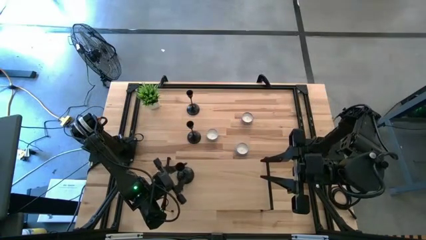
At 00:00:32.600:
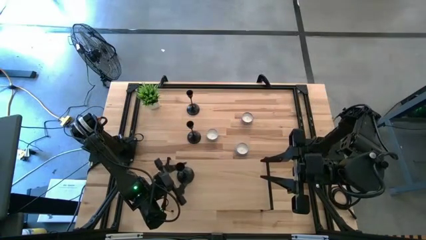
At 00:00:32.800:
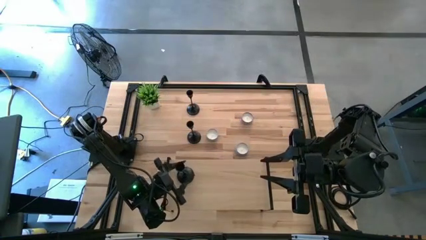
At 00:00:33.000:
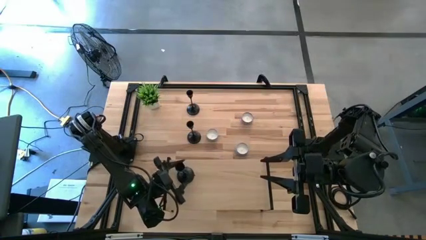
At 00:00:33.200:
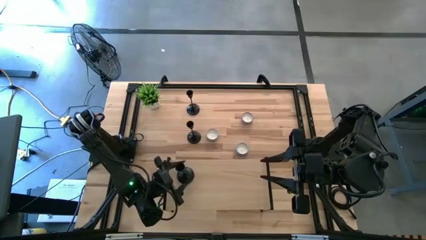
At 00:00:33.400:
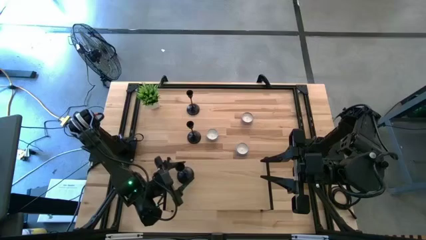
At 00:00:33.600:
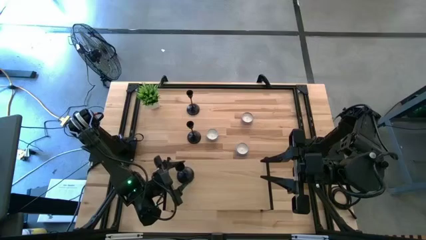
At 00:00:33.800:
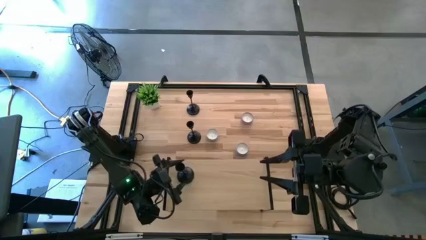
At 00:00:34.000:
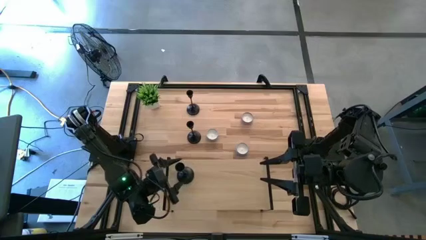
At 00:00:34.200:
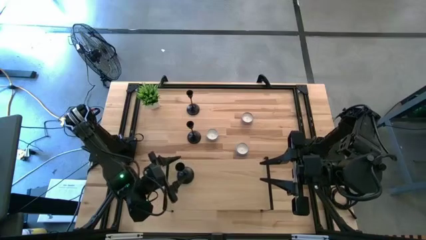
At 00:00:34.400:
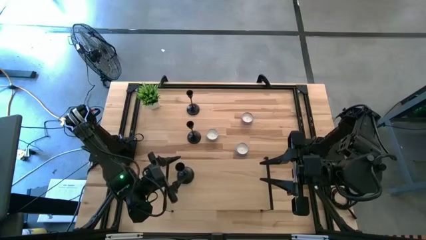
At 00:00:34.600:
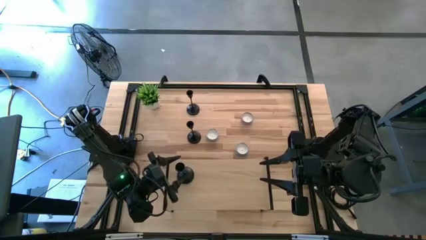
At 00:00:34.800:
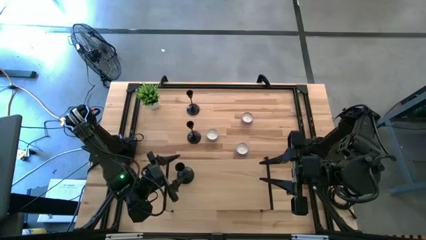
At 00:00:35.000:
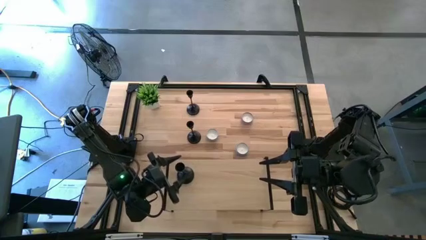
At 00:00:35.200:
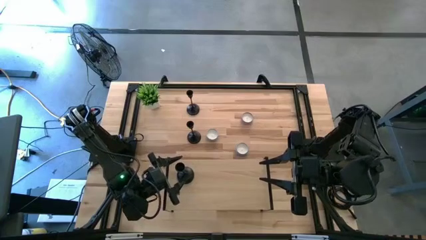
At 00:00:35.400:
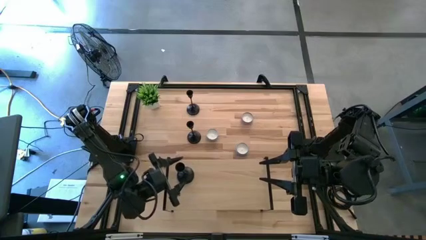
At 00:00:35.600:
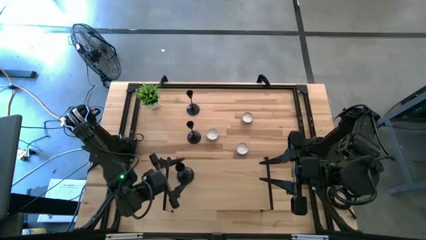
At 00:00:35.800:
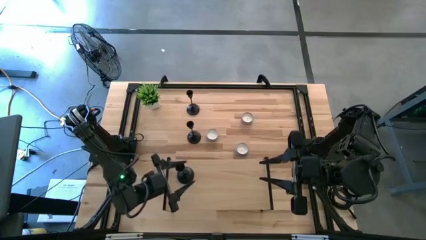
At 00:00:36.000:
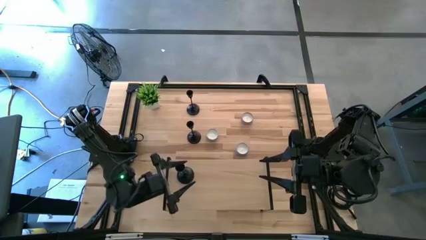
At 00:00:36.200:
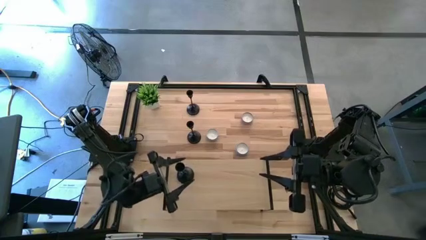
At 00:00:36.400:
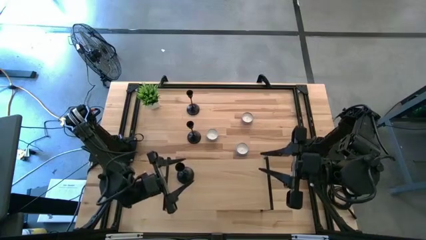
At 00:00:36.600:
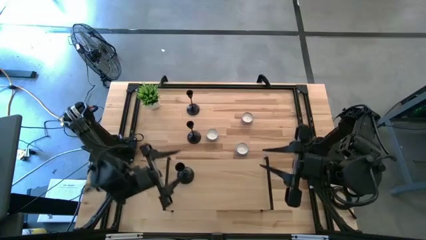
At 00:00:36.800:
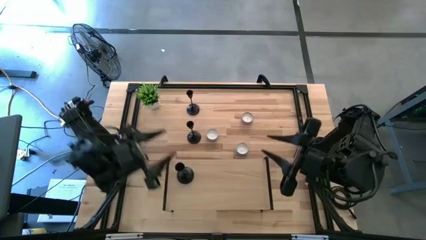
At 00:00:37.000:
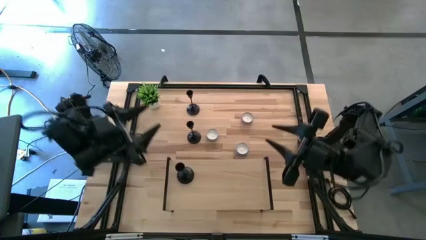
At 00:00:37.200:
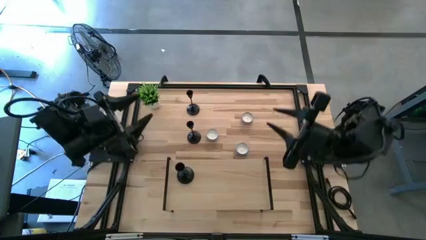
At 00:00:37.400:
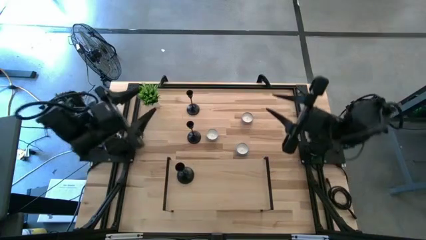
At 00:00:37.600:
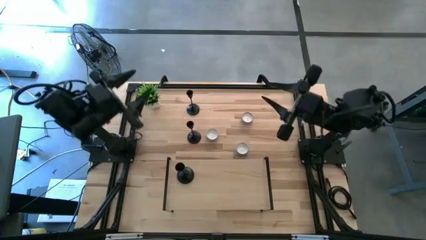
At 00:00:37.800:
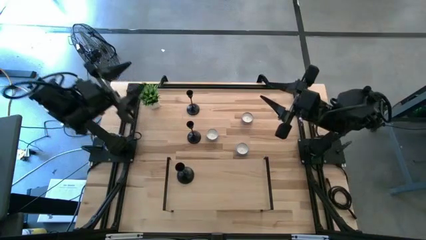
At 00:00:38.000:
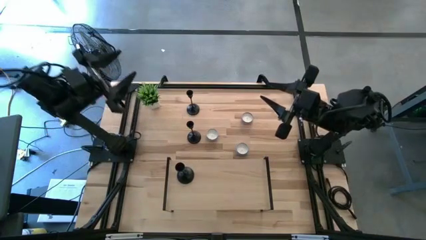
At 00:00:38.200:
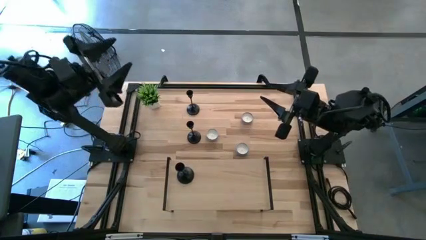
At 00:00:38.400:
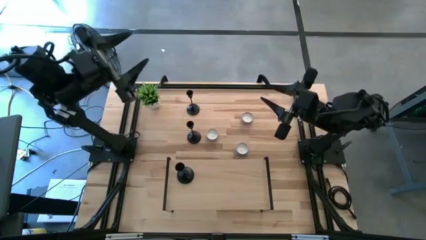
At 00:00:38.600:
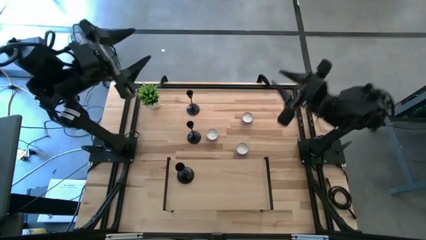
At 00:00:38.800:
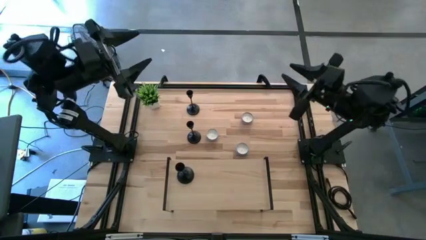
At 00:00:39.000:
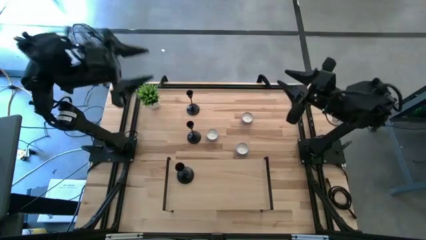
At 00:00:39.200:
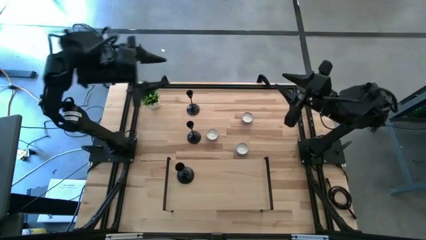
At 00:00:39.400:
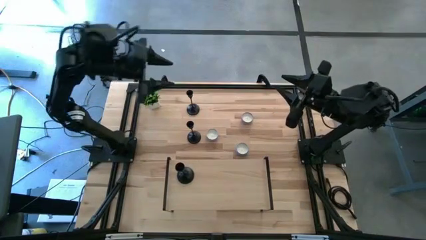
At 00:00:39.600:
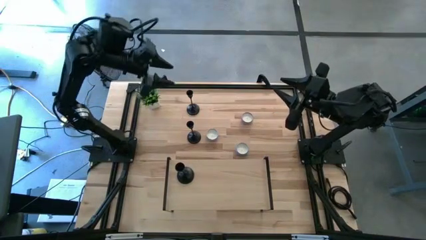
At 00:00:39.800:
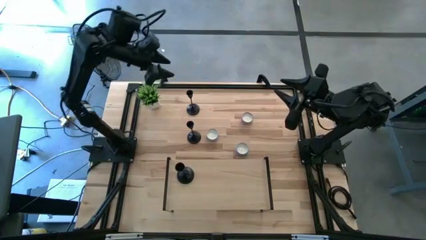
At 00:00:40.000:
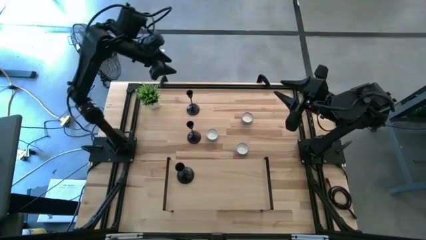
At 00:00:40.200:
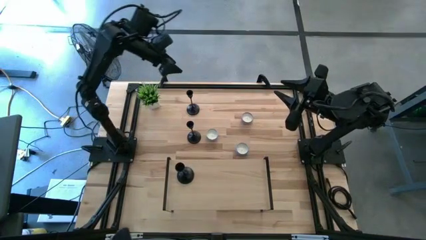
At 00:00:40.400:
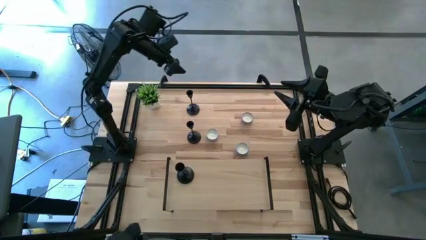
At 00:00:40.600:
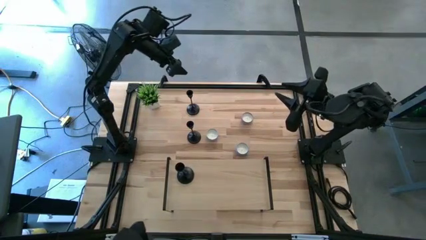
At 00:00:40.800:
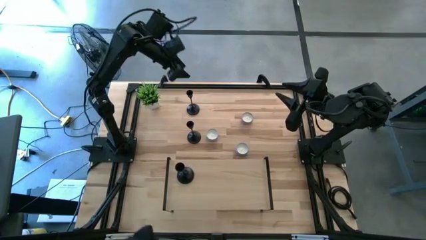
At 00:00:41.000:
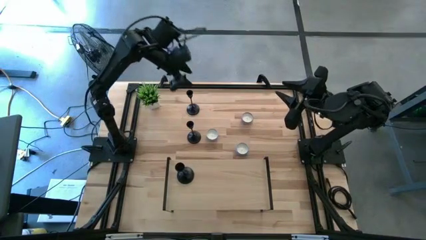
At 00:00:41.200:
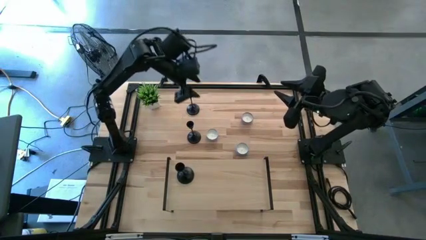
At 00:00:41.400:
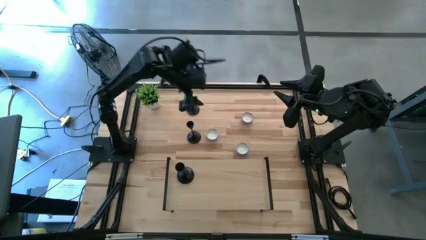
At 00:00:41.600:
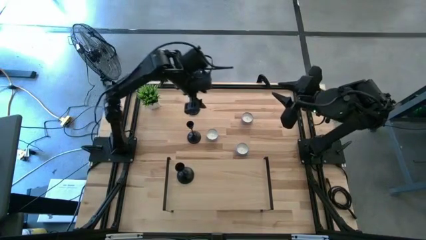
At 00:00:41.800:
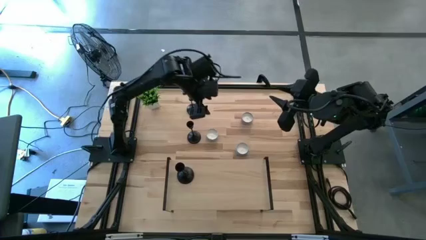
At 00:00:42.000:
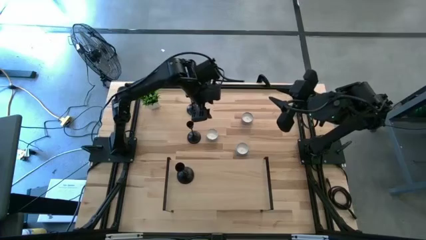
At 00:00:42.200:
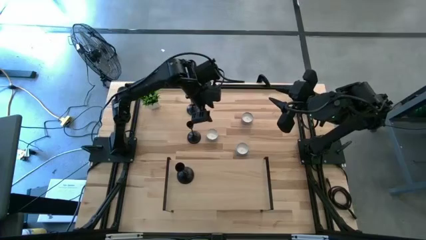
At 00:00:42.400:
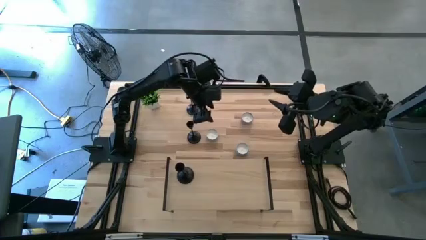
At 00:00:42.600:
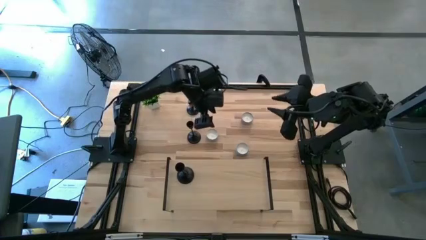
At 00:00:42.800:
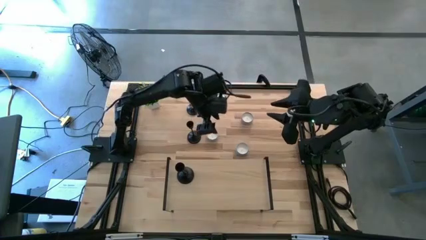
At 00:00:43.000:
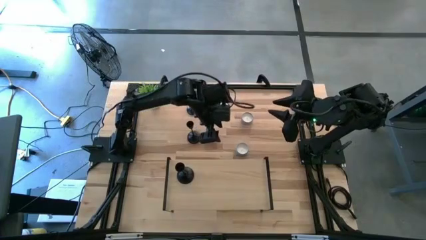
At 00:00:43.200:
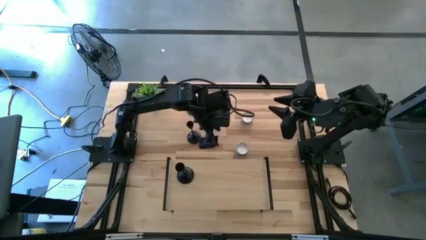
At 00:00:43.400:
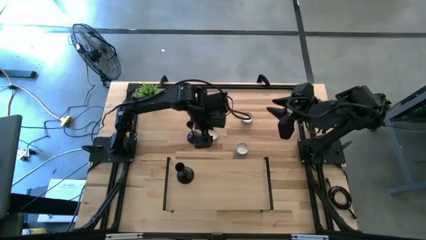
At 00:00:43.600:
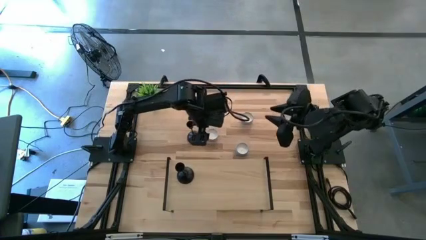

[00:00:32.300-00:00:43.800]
Task: Pick & Place candle stick holders
Put the red scented candle on the shelf
